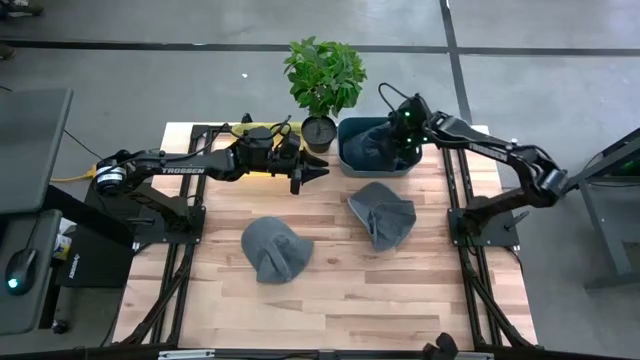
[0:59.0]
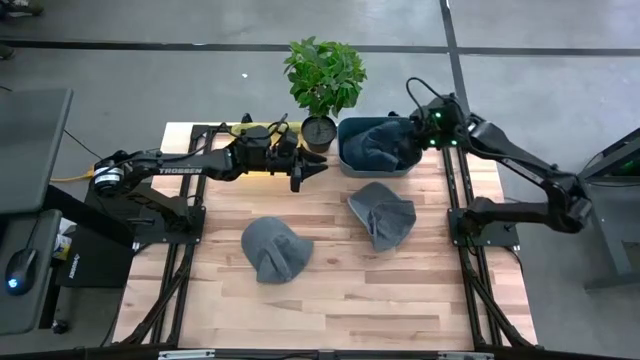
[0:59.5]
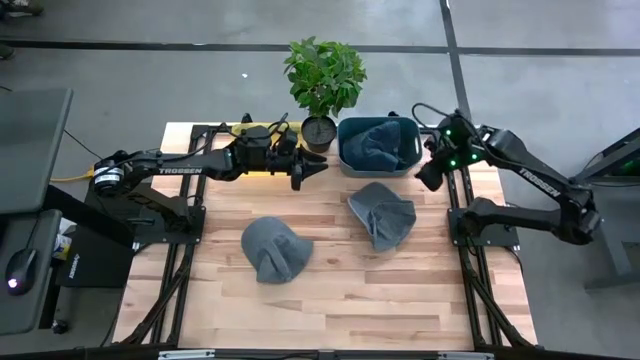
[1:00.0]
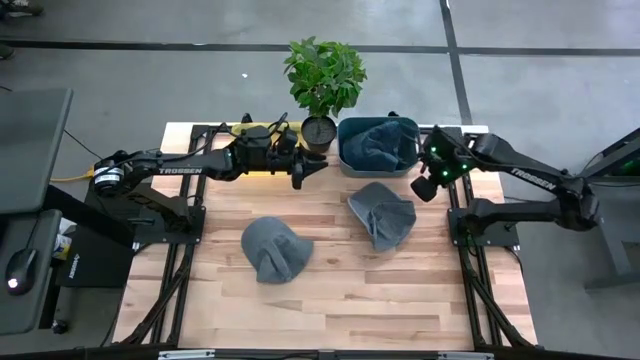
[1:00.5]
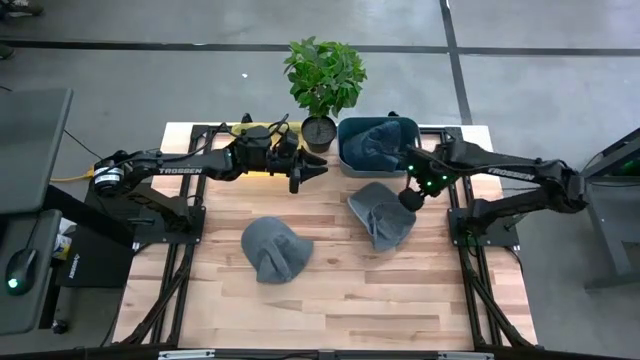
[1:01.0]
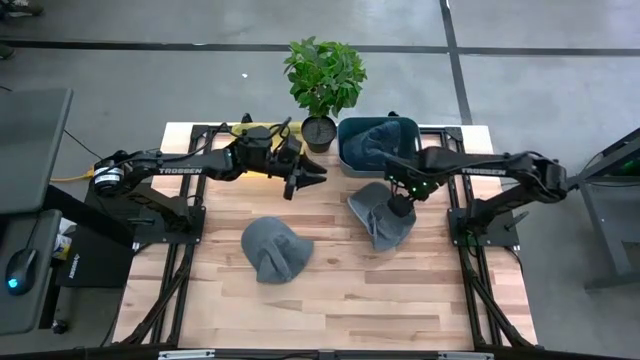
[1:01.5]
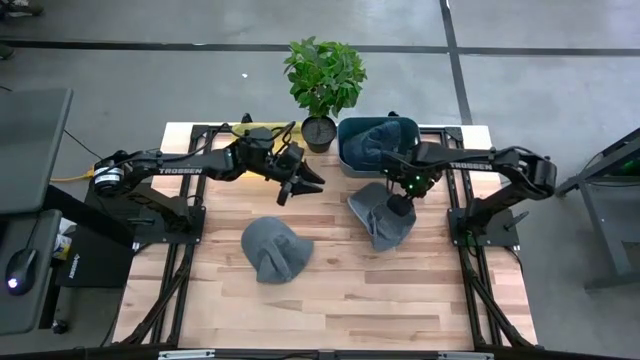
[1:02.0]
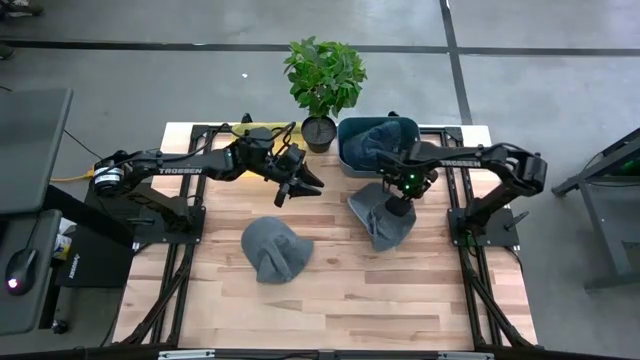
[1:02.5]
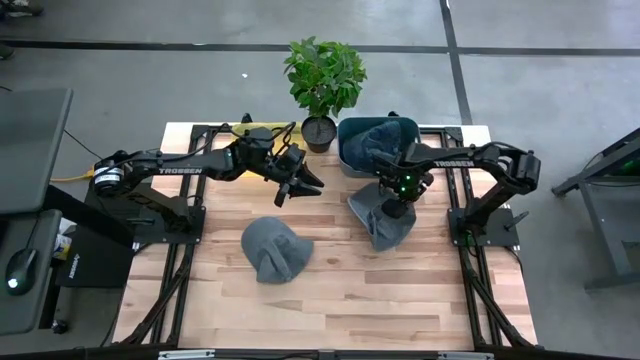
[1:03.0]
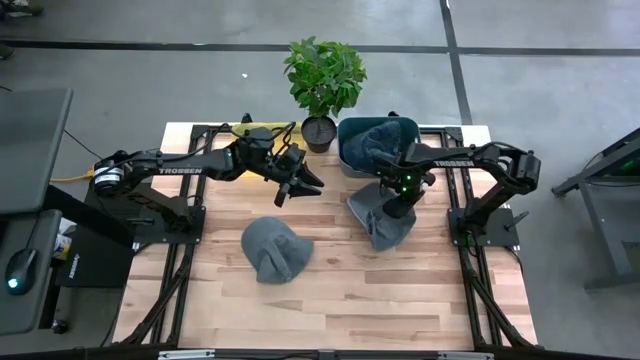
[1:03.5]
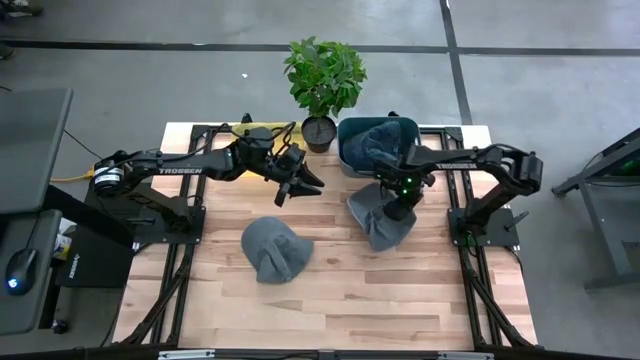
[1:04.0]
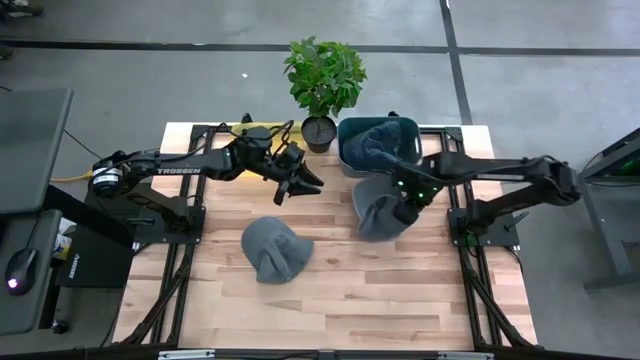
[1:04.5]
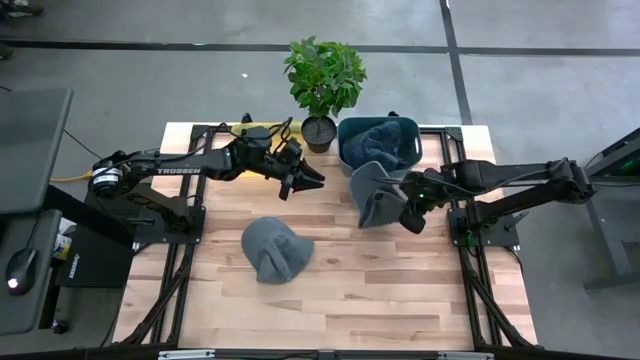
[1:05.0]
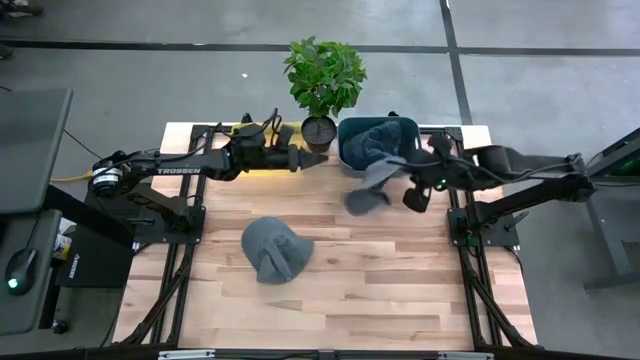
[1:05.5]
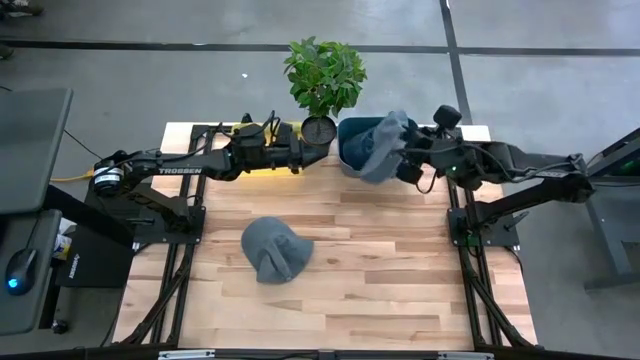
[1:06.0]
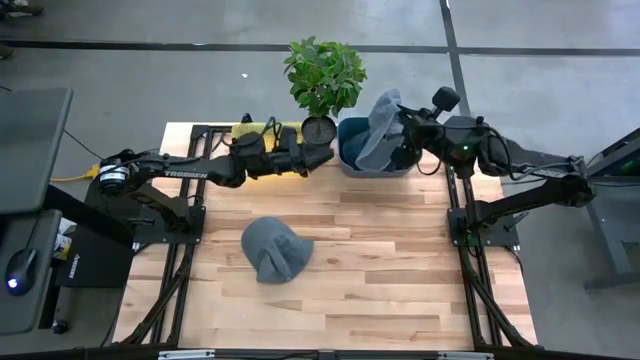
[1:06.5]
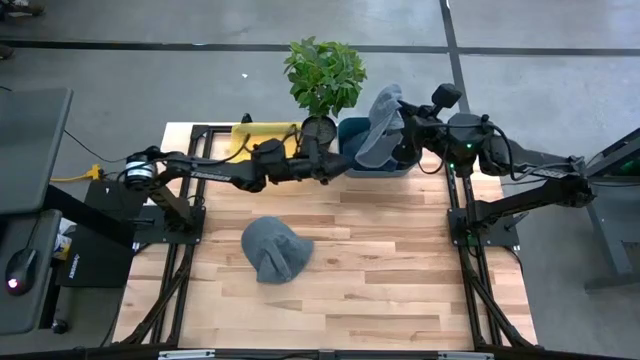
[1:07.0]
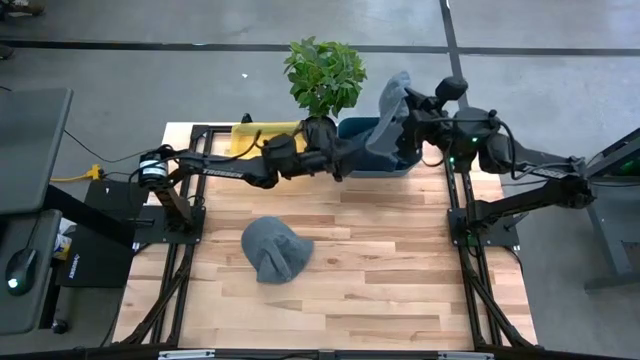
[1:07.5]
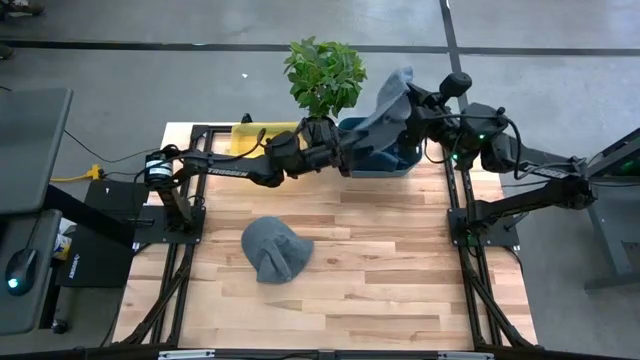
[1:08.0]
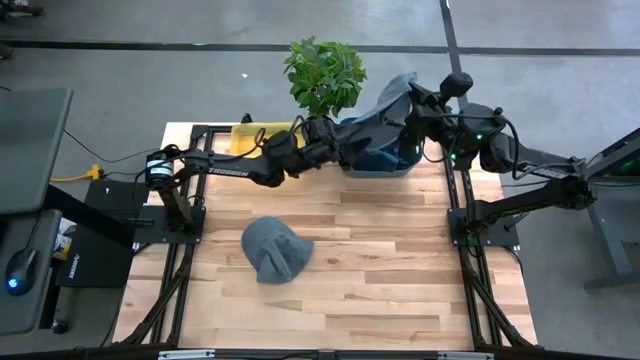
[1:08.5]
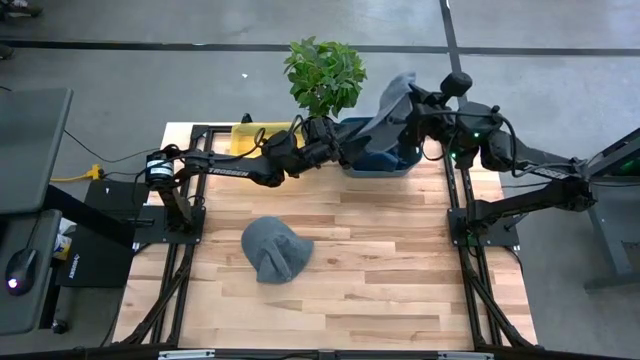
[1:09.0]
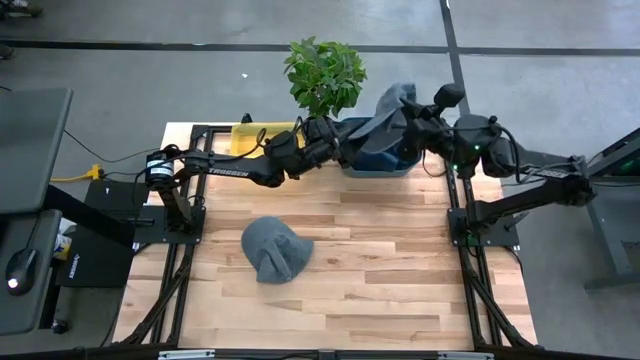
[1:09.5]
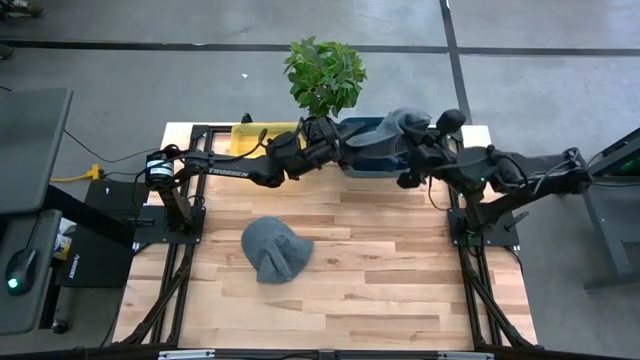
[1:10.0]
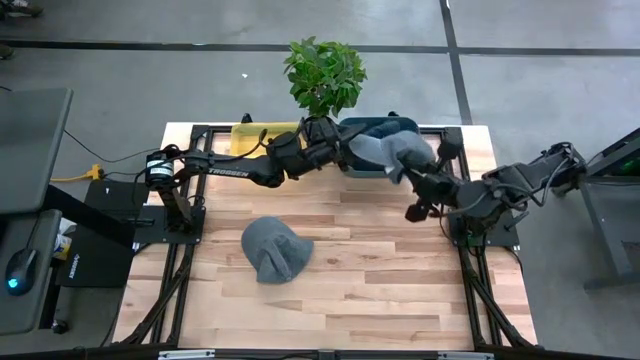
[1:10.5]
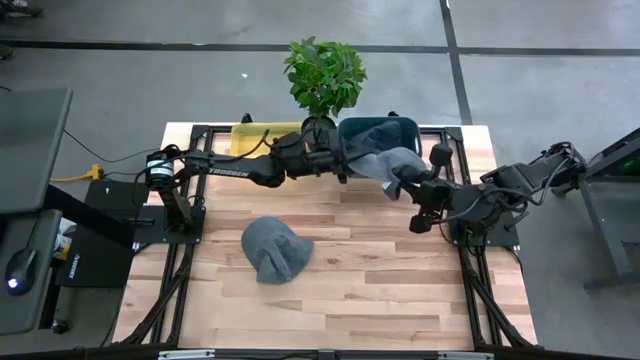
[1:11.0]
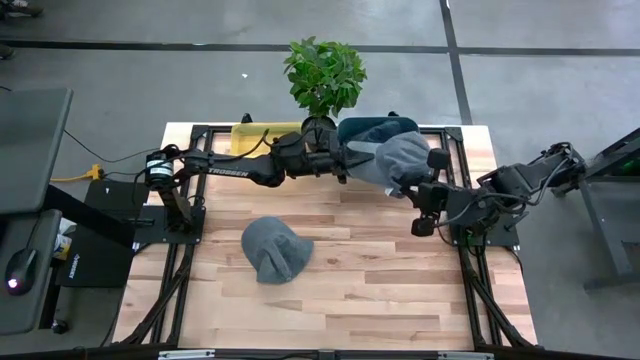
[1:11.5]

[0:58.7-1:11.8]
Task: Pick & Place hat
Put the right gray cap into the yellow bin
